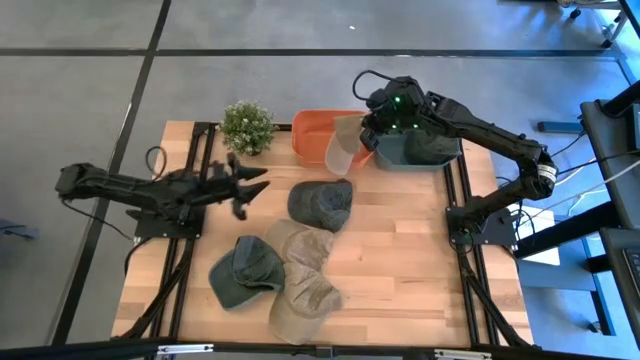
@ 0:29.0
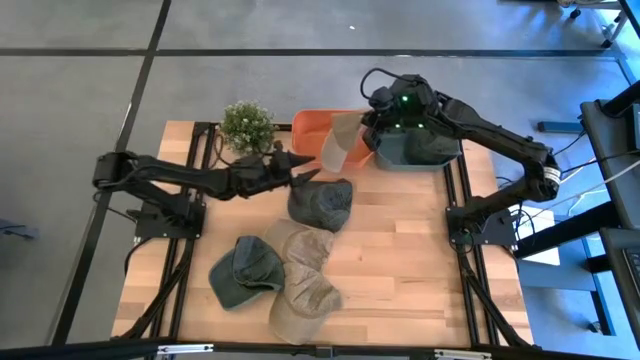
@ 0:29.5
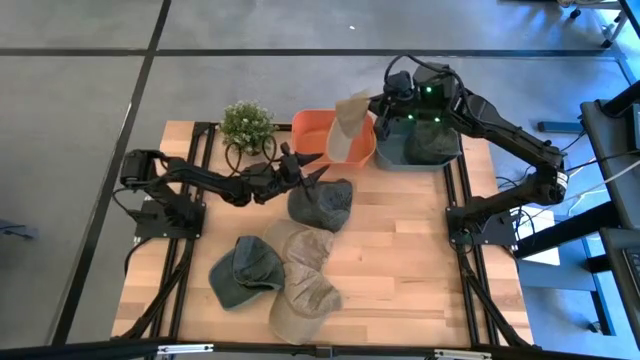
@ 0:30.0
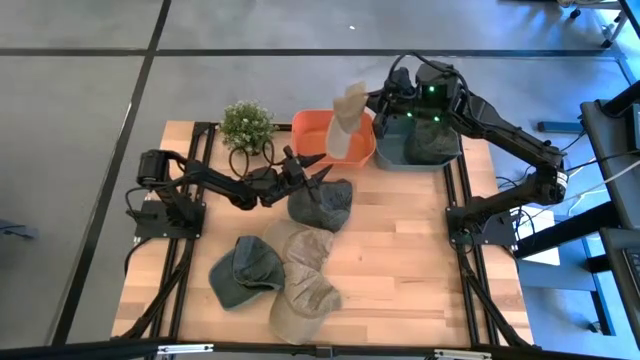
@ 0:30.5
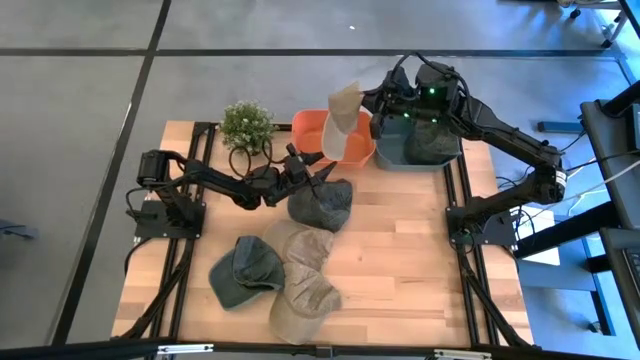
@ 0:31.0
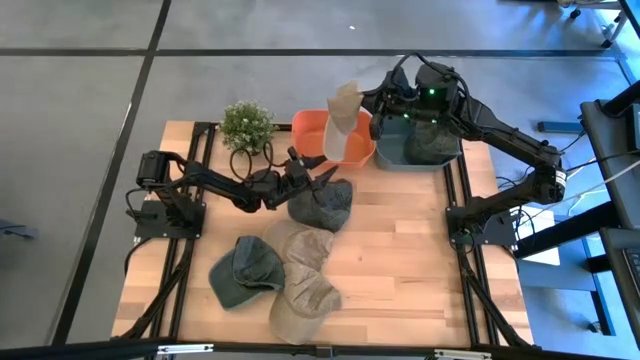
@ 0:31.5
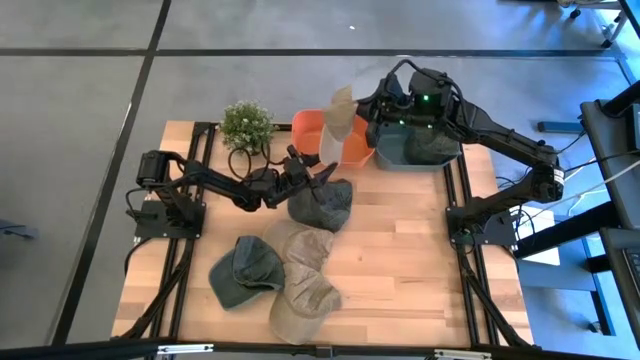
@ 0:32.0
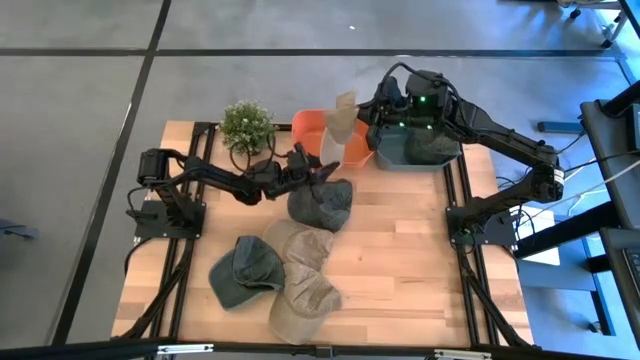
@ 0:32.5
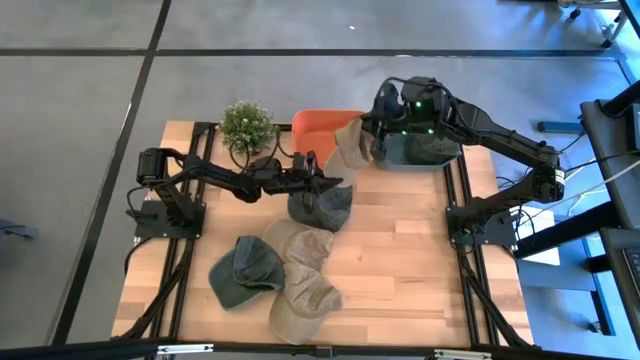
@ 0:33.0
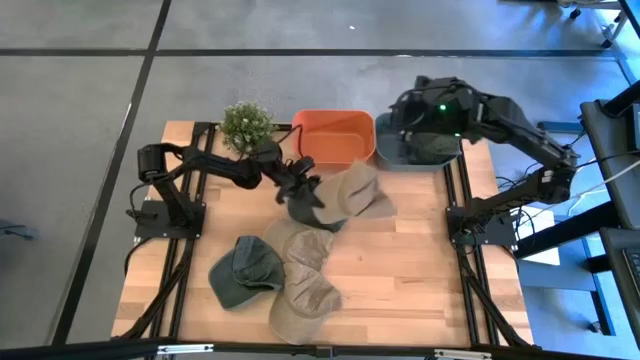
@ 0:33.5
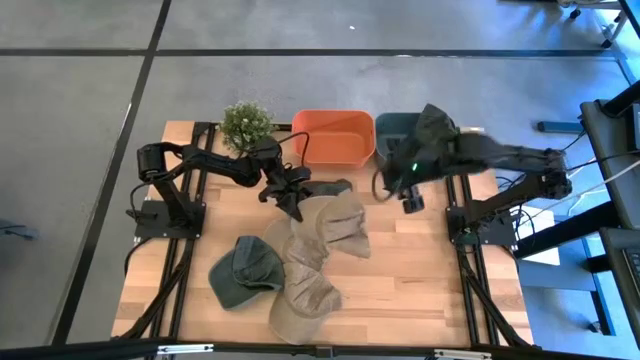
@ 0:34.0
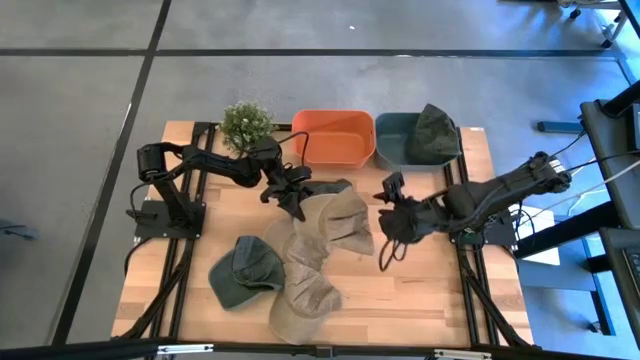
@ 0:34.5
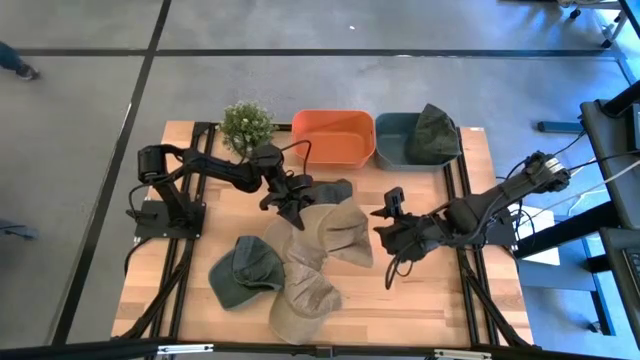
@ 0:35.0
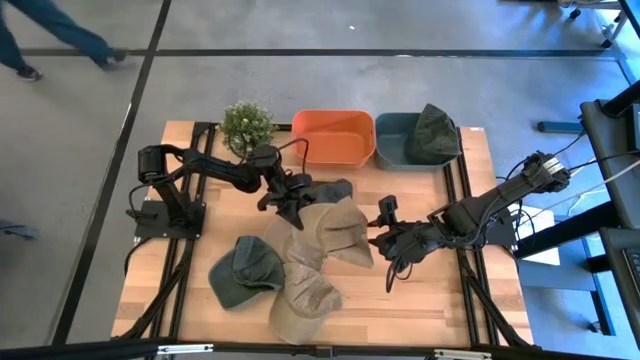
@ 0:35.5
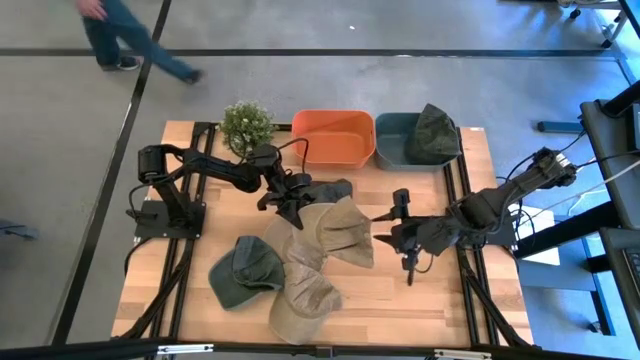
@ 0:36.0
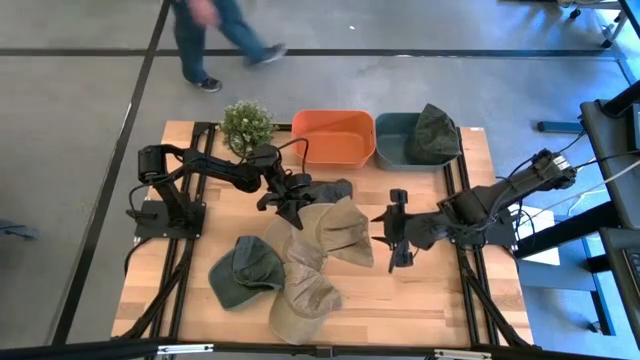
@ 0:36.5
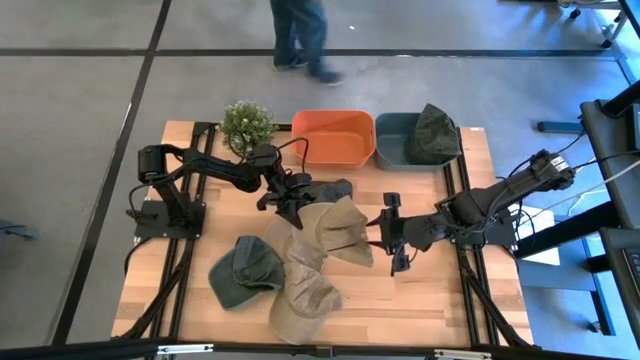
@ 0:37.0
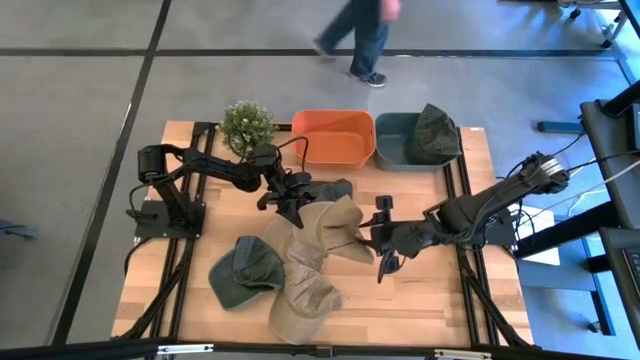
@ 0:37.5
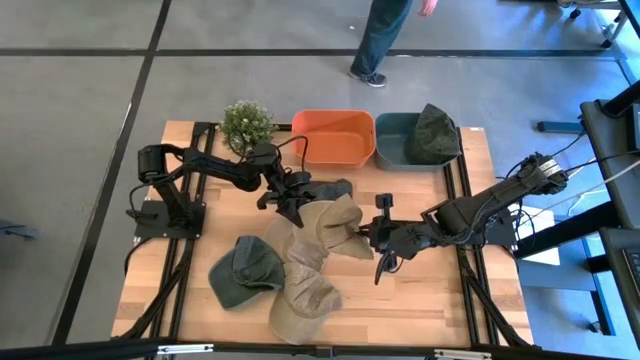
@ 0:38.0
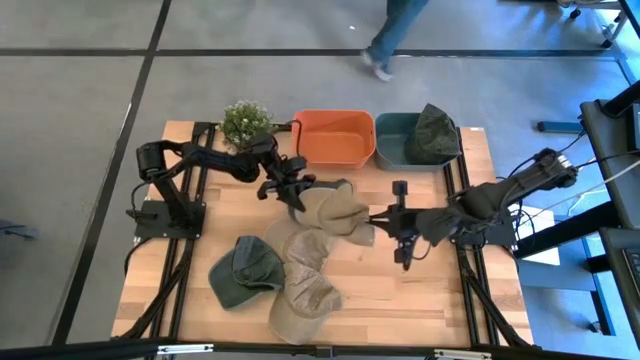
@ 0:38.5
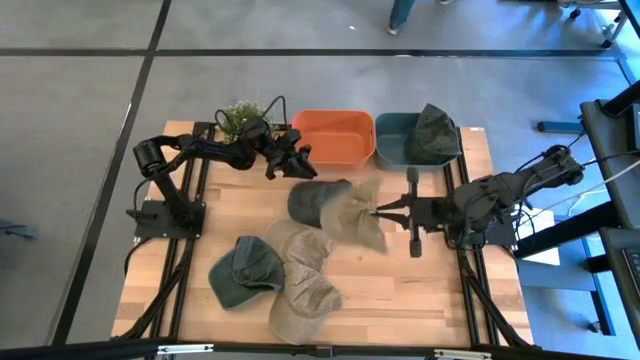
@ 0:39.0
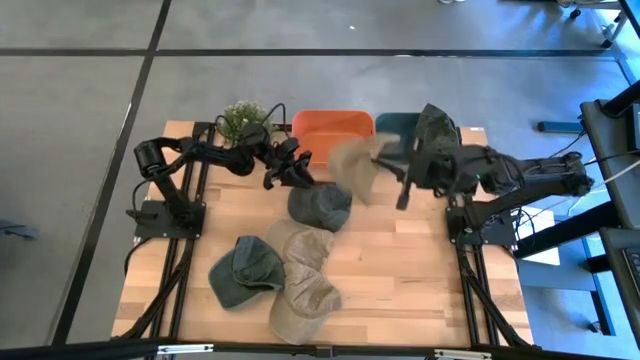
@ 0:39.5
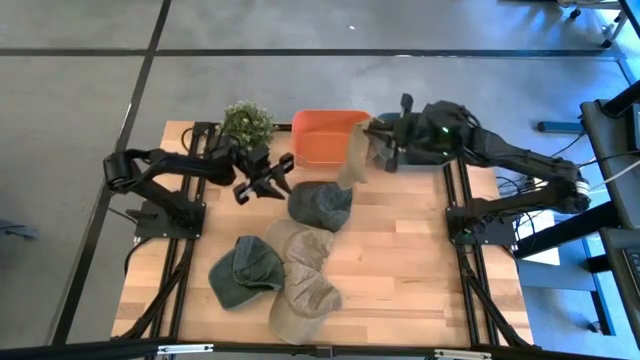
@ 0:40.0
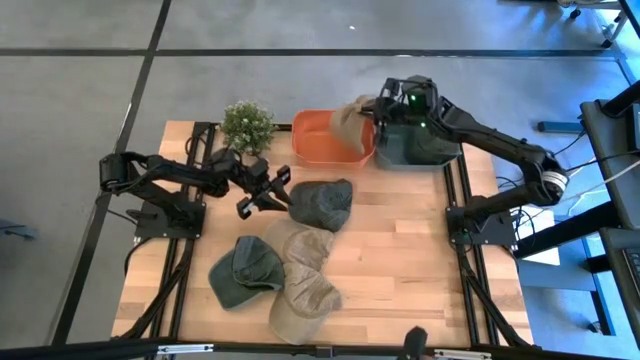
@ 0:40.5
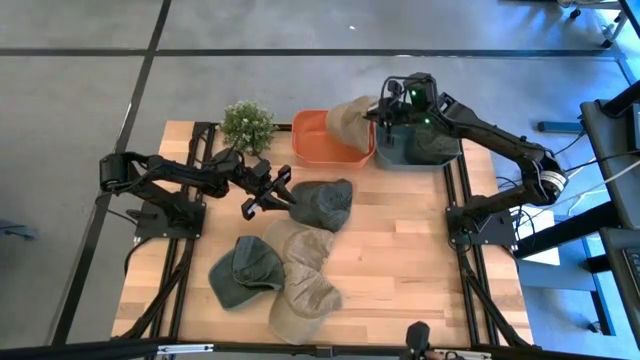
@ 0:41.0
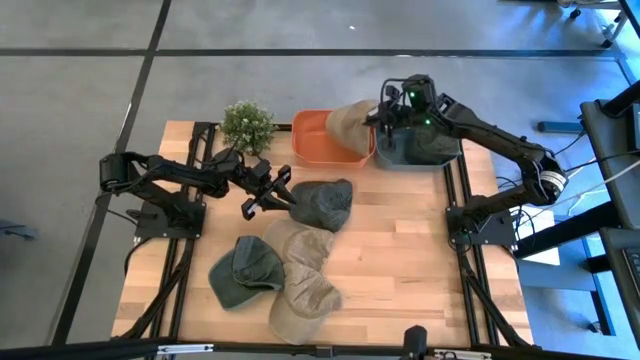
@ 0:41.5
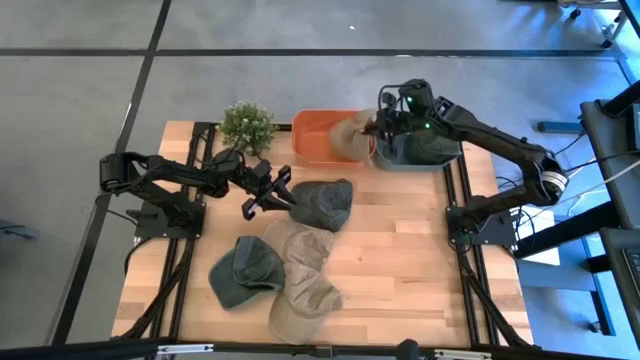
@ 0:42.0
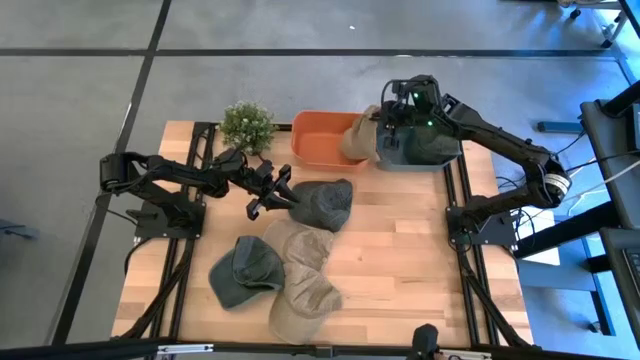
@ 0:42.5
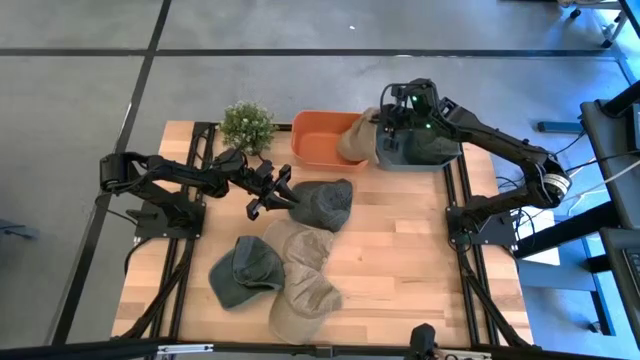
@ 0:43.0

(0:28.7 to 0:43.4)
Task: Pick & Place hat
Put the right brown cap into the orange bin

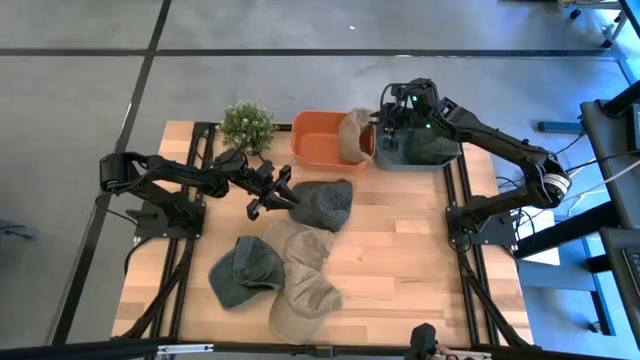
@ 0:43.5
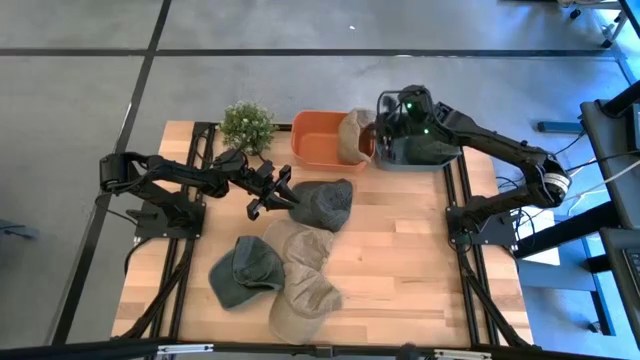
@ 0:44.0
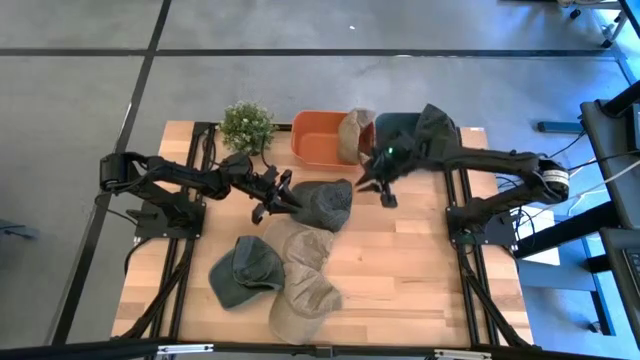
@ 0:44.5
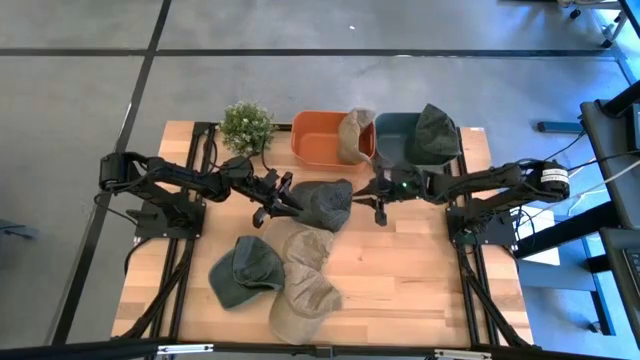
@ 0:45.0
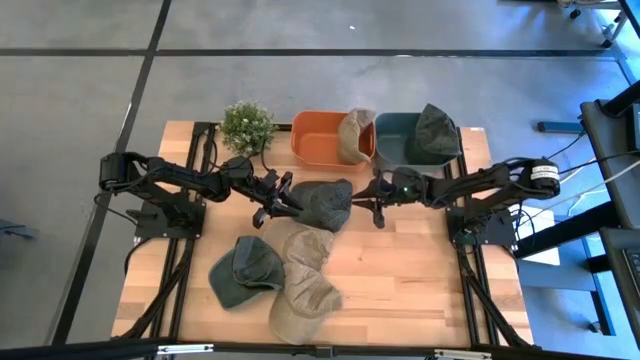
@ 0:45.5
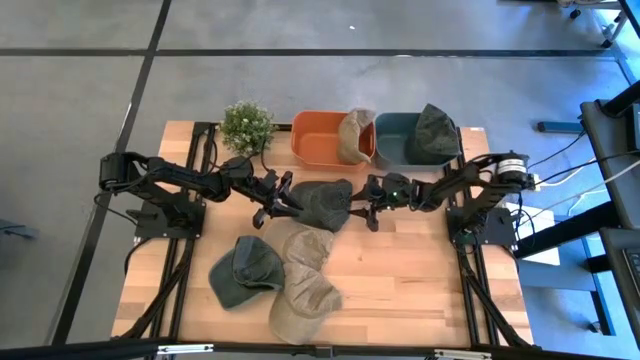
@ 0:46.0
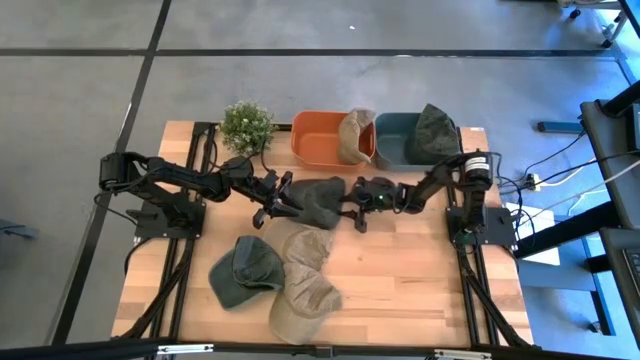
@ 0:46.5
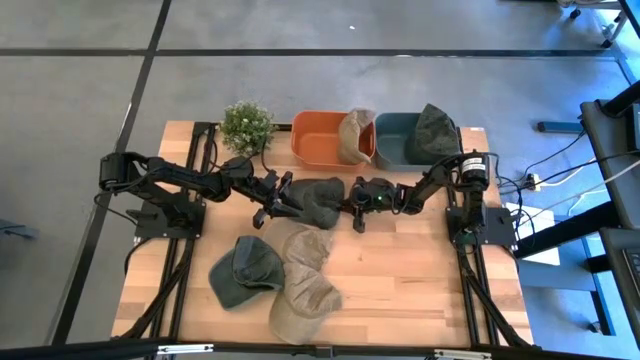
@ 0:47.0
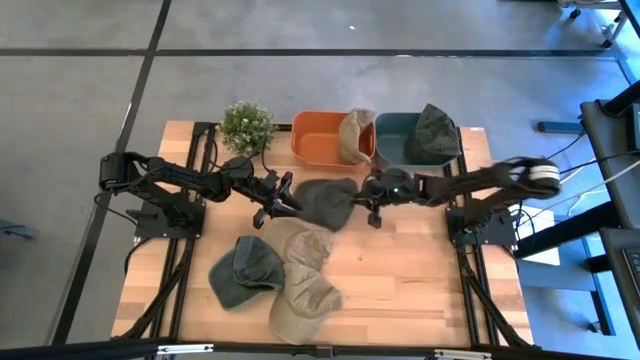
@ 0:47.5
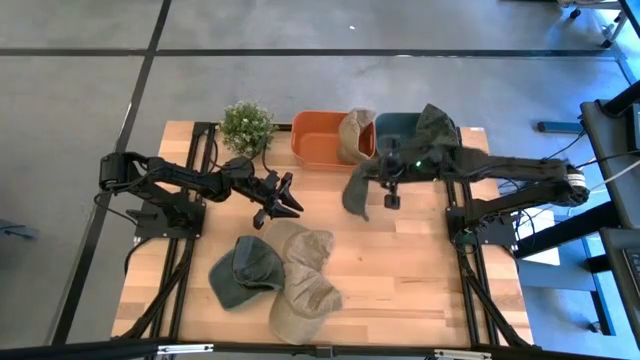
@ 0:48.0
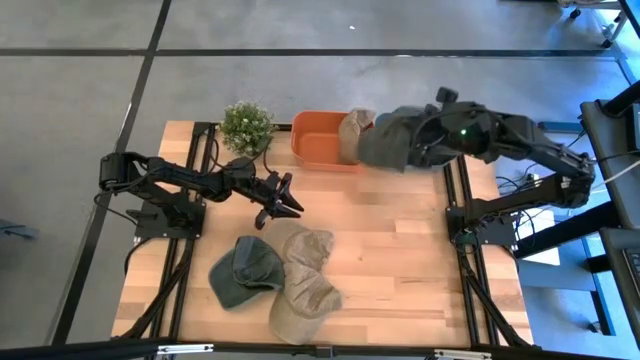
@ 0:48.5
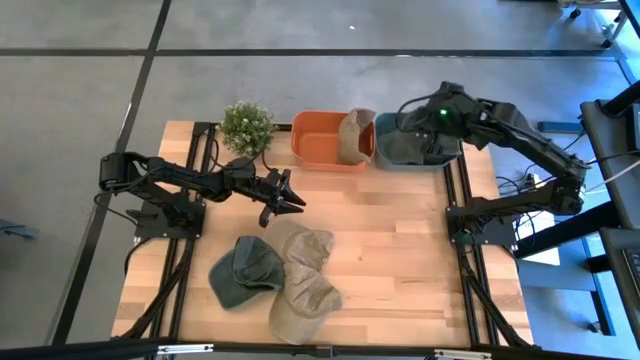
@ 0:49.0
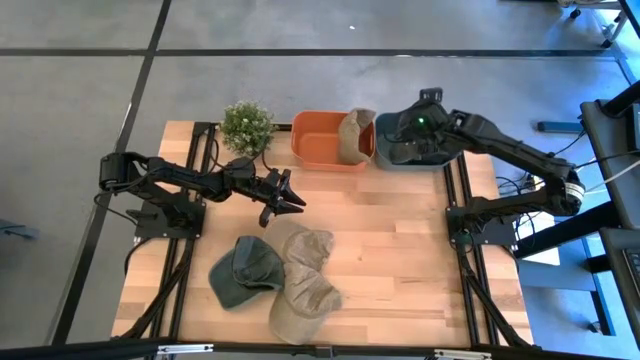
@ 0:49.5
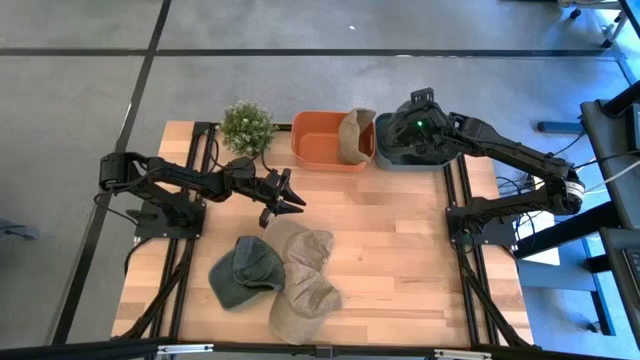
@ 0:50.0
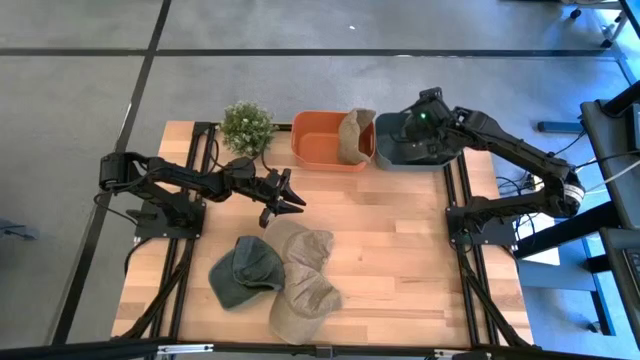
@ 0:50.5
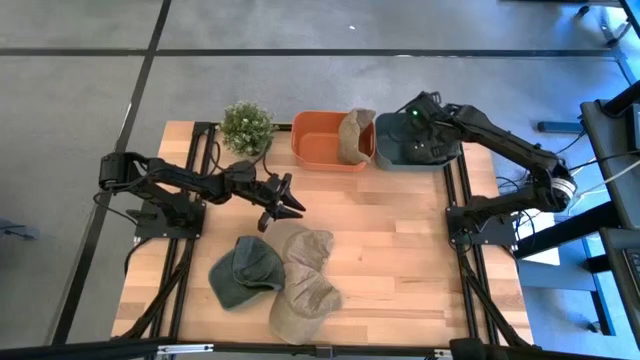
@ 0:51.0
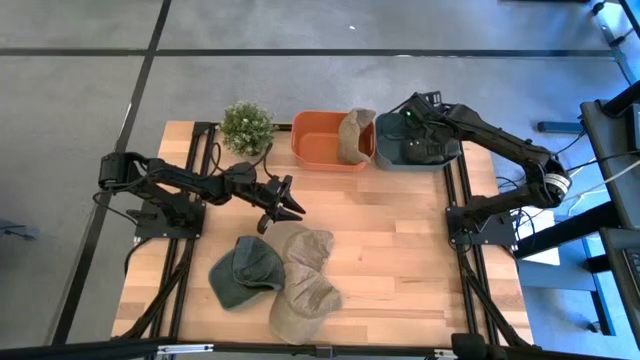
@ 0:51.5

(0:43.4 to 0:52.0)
Put the top black cap into the blue bin
